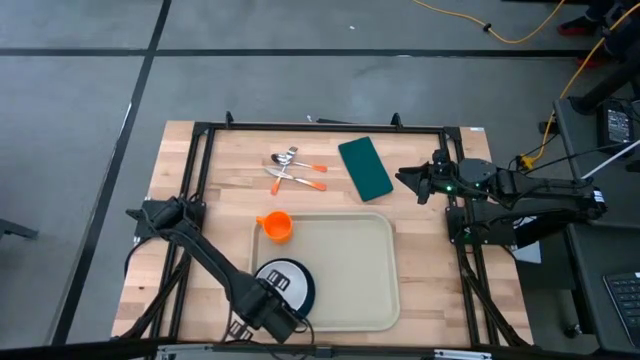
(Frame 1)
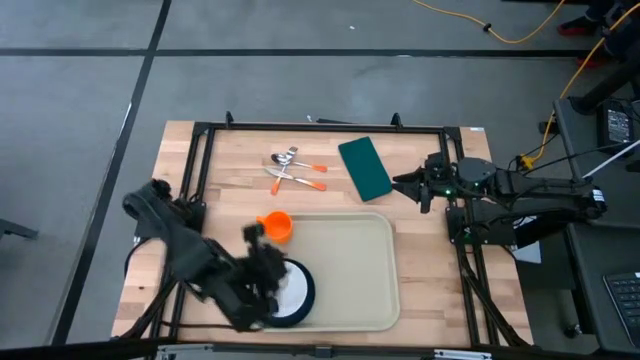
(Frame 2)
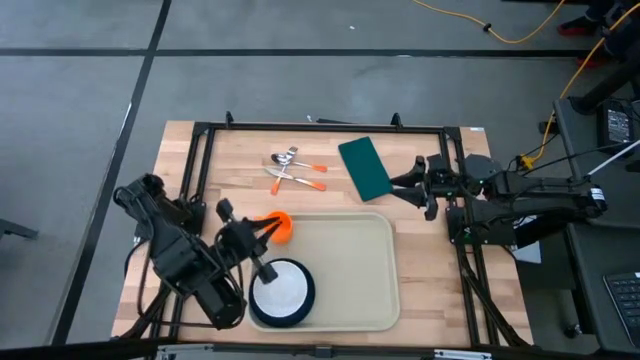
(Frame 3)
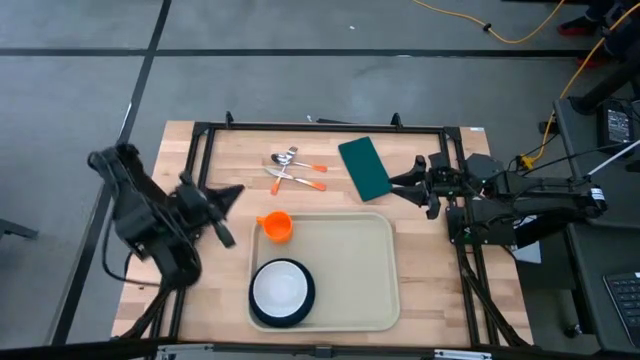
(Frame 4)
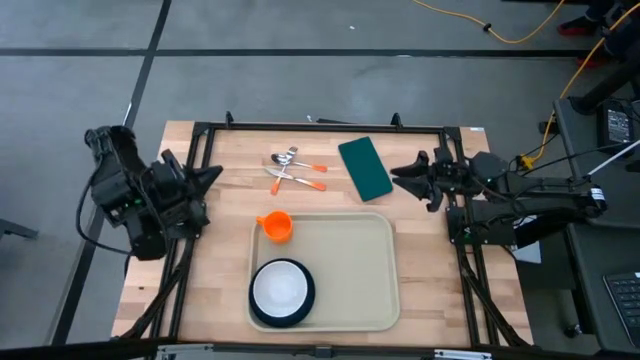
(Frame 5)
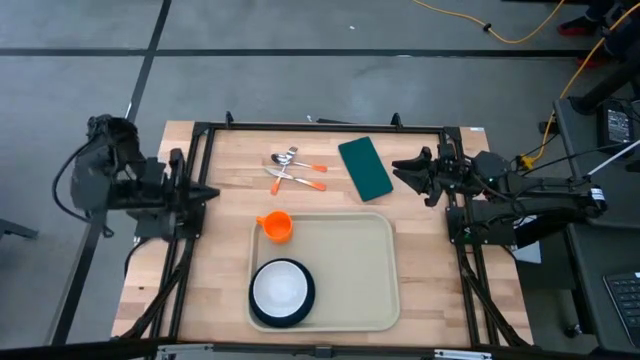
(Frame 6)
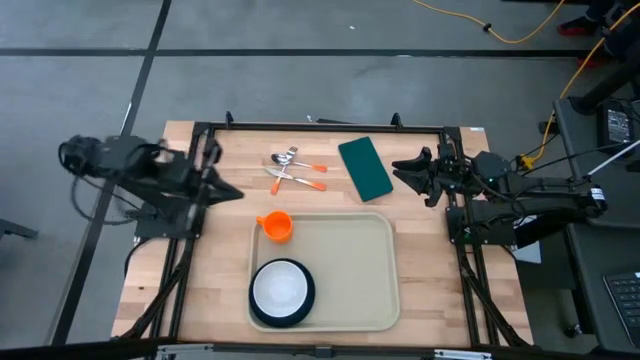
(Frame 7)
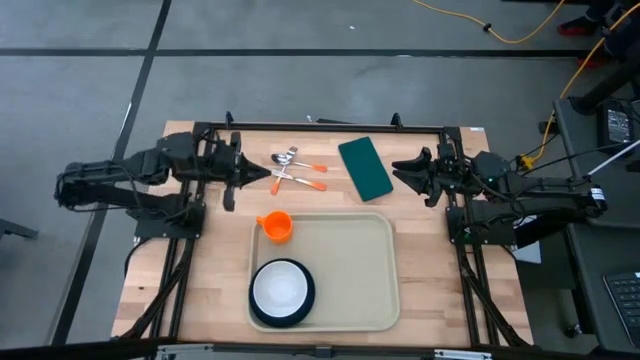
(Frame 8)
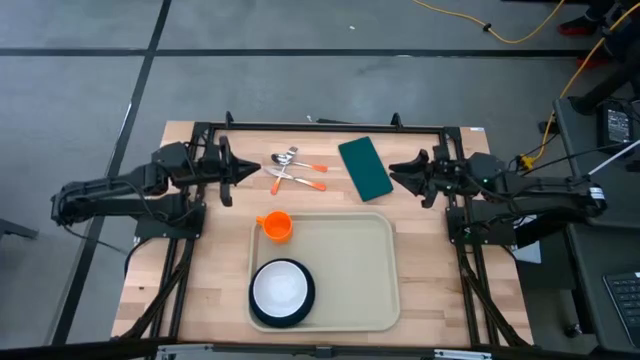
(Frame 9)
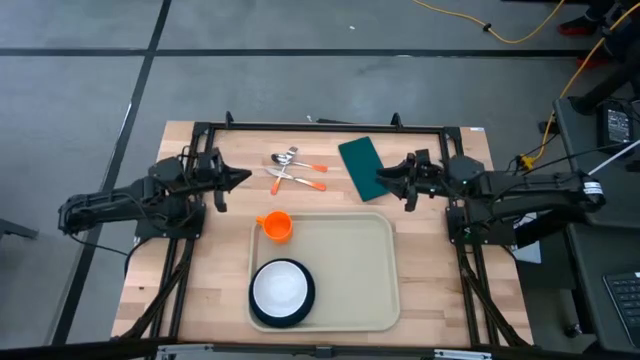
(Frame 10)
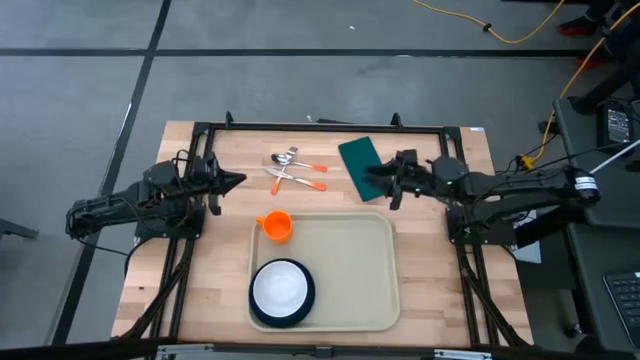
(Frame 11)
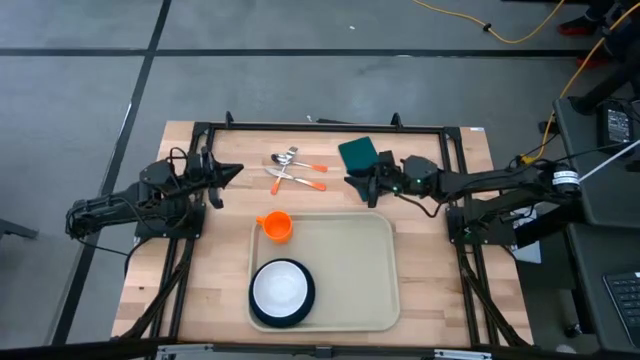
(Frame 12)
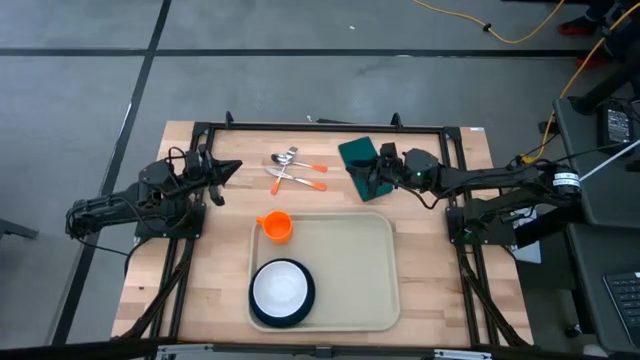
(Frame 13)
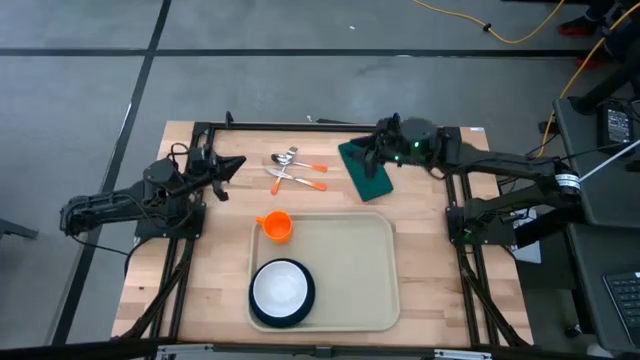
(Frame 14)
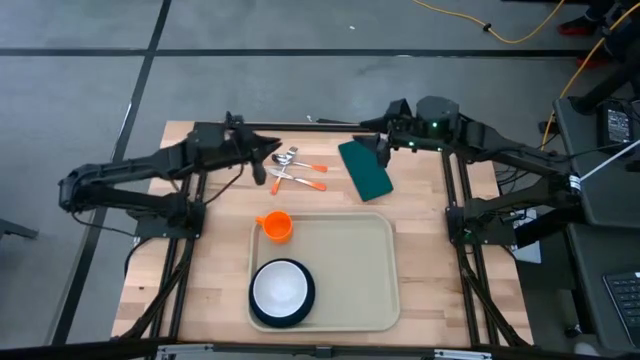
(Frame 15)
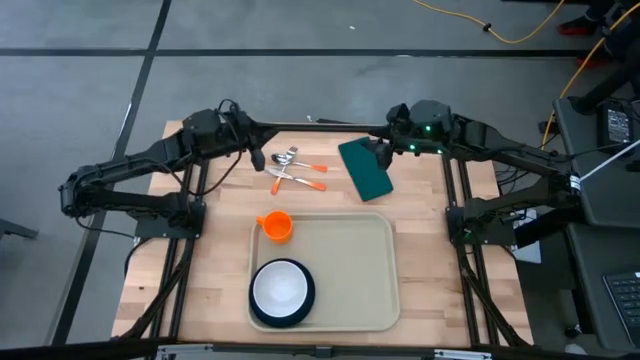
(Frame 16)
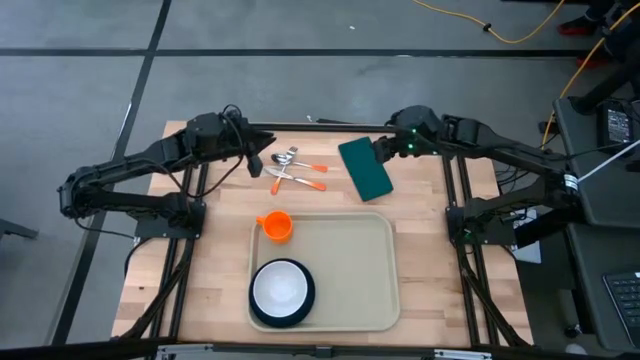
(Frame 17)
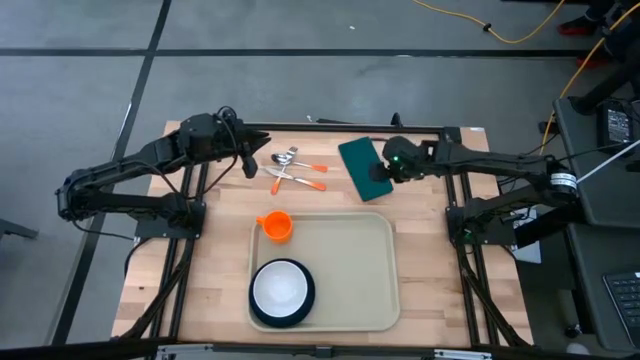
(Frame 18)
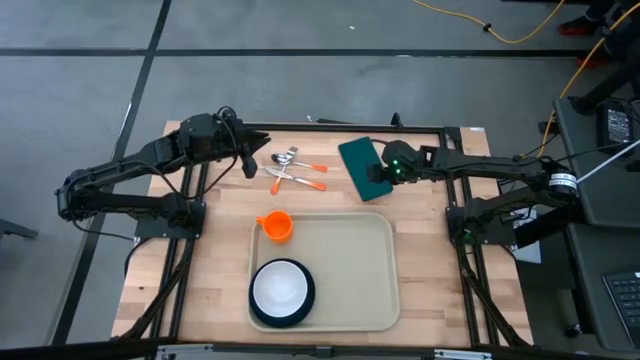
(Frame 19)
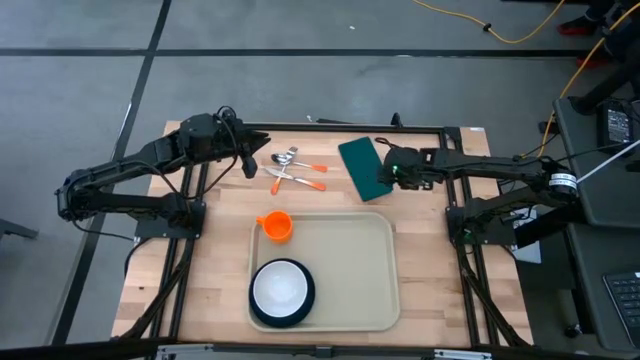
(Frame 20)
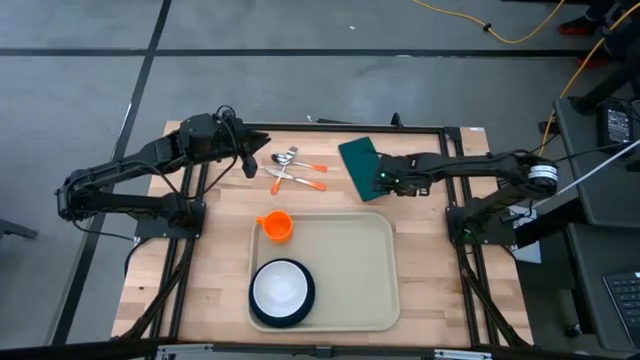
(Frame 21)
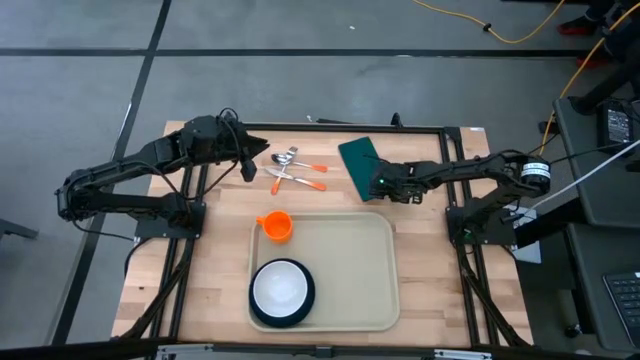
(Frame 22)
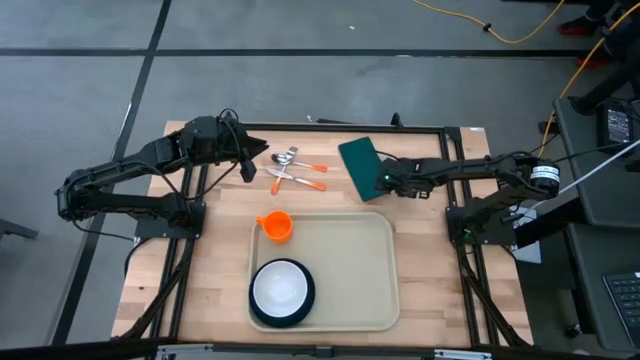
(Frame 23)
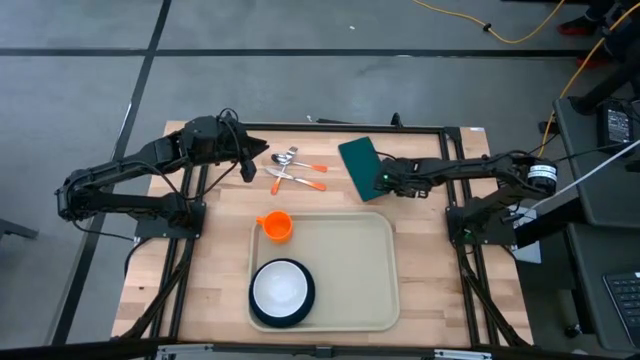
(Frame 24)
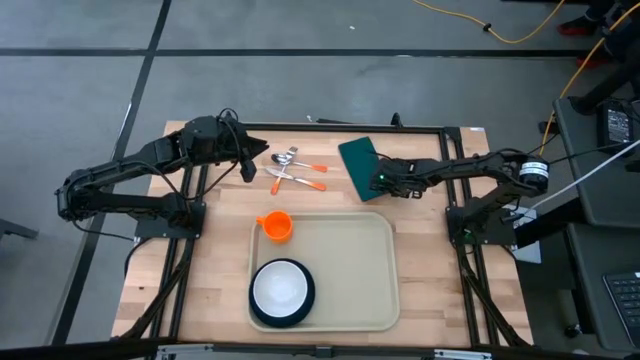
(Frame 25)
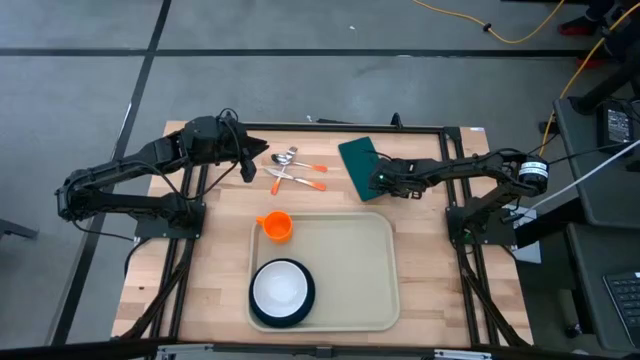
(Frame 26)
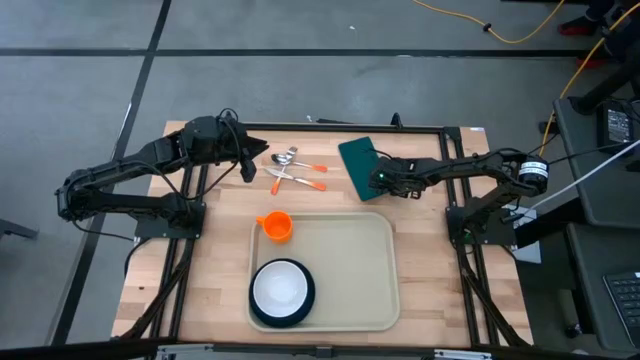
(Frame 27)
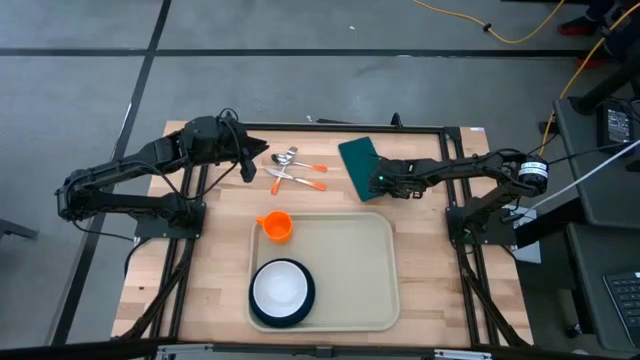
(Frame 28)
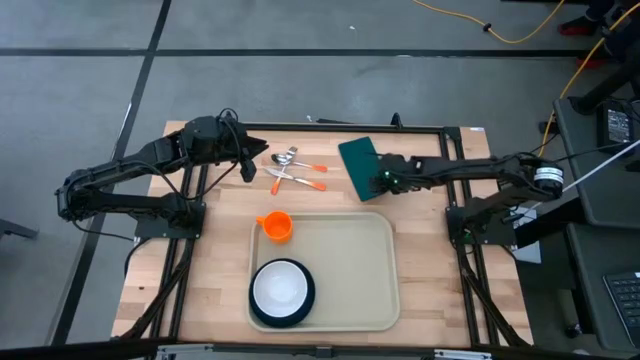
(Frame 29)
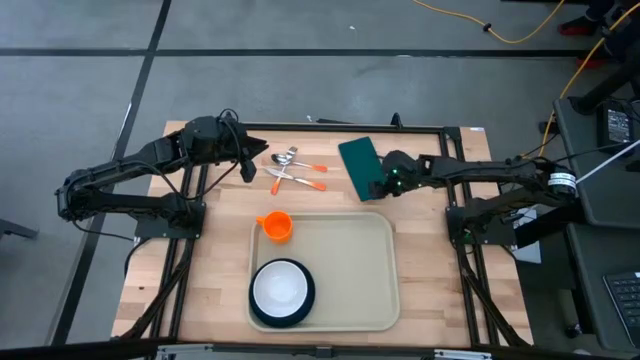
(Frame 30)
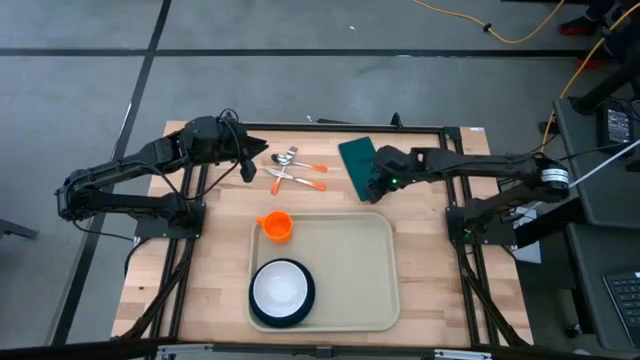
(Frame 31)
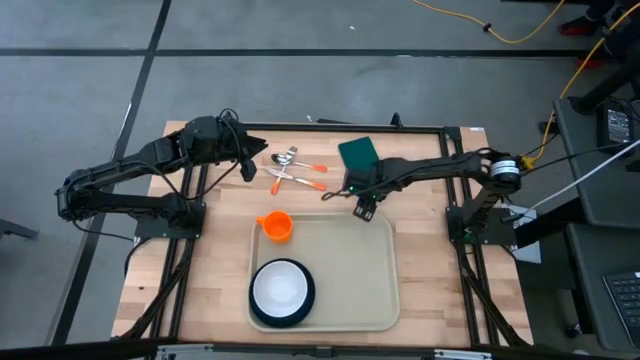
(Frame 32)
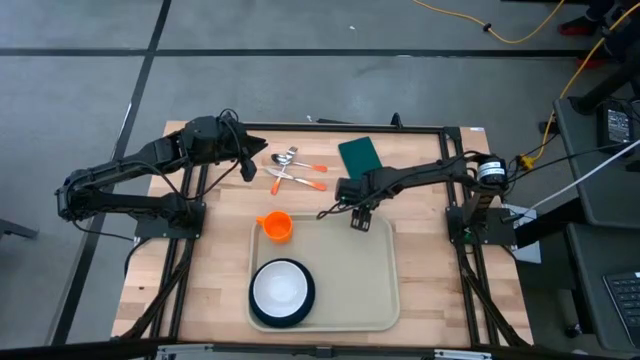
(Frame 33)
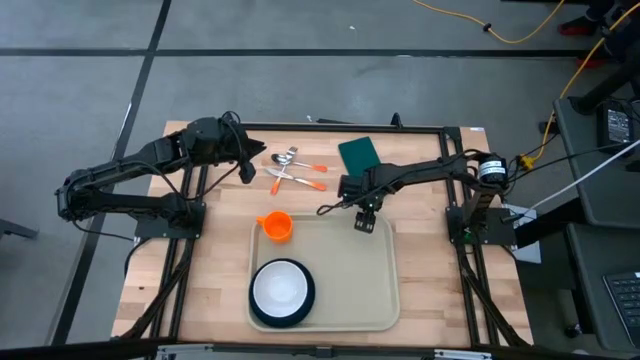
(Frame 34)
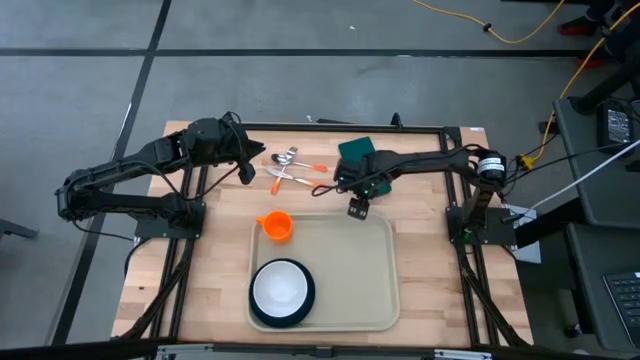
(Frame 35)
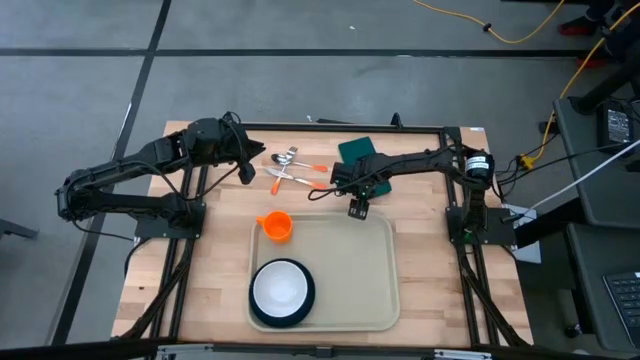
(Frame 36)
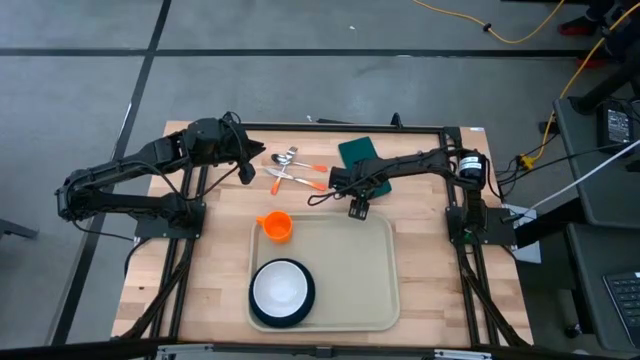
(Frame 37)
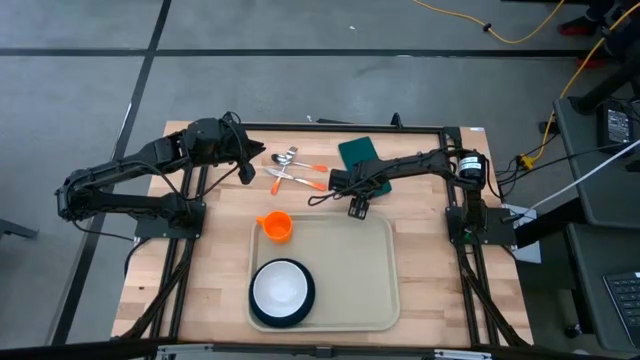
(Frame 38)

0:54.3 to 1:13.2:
Task: Set up tray
Put the dark blue napkin to the right of the black plate on the gray serving tray

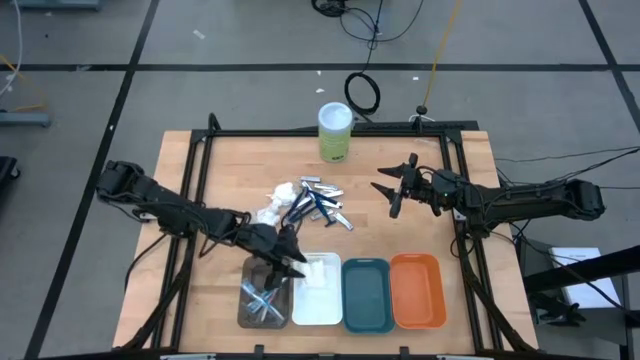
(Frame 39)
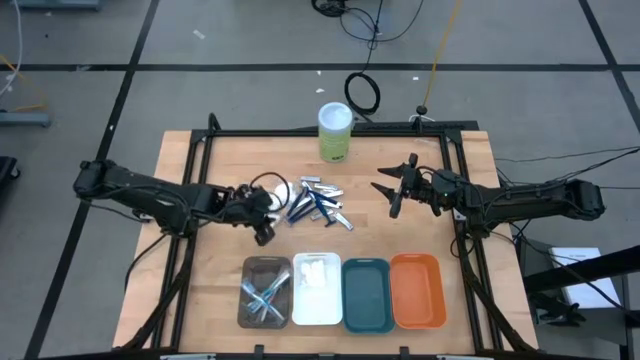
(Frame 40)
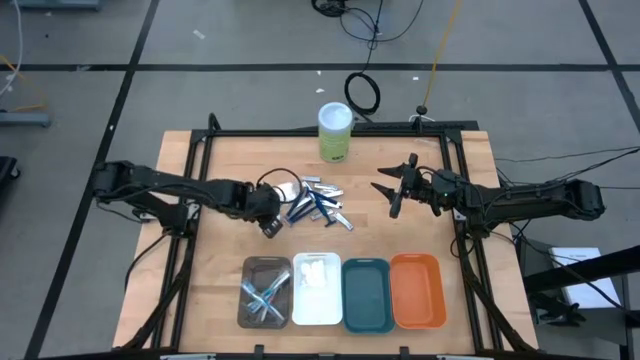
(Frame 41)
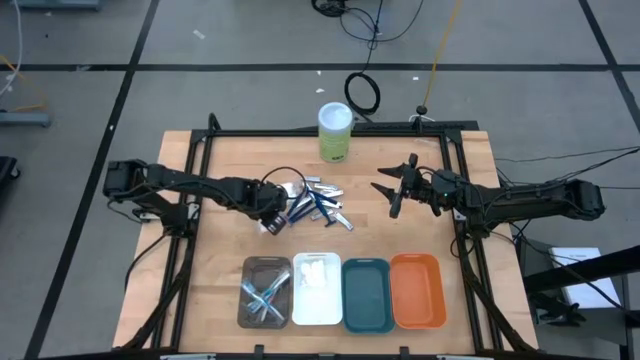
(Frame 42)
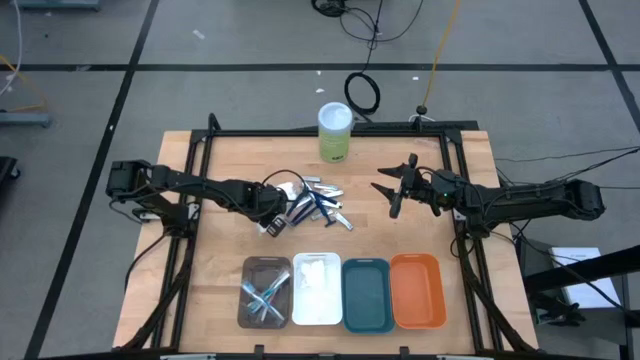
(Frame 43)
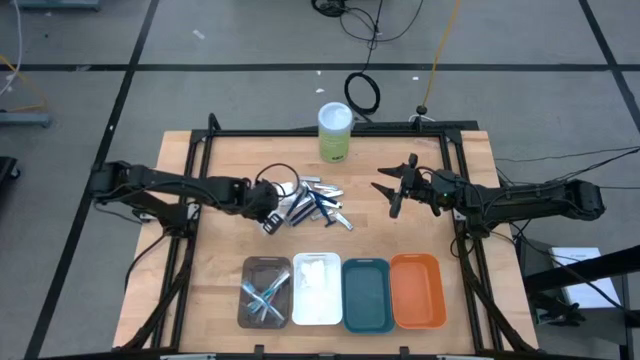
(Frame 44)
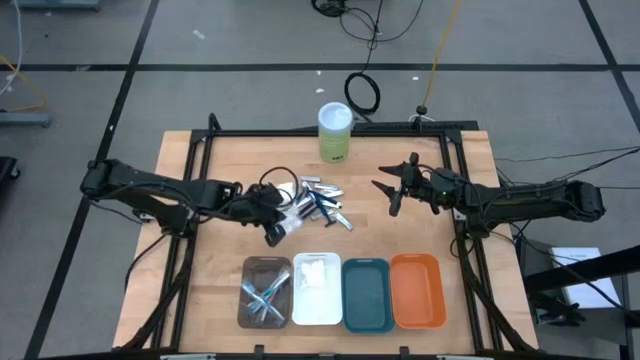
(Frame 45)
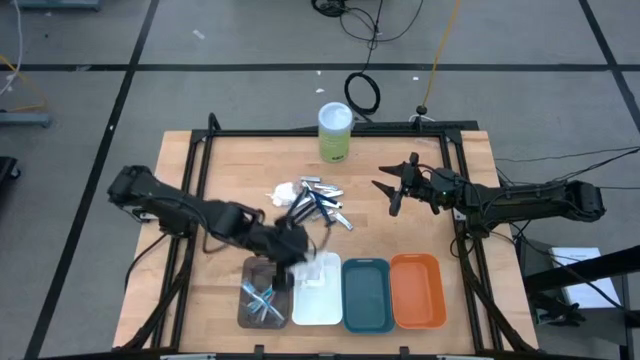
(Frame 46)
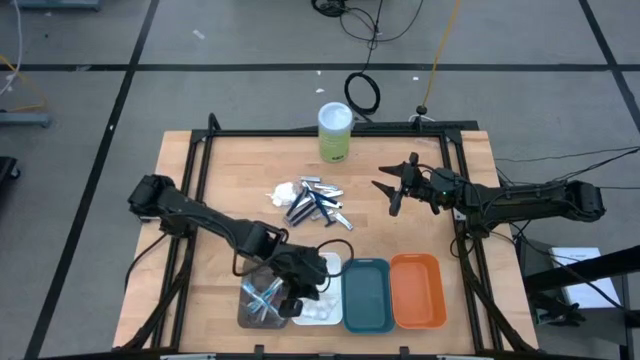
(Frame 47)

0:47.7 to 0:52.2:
Task: Pick & Place Travel size toiletries
Put the white cotton pack into the white bin
